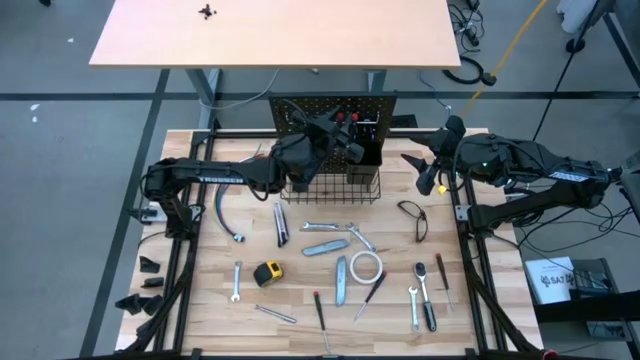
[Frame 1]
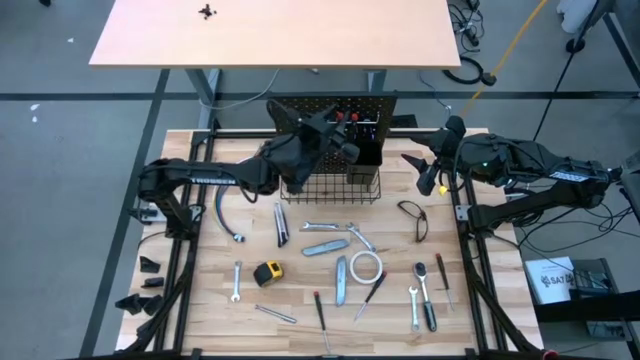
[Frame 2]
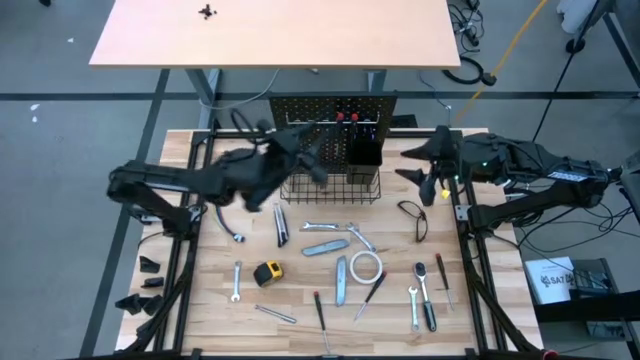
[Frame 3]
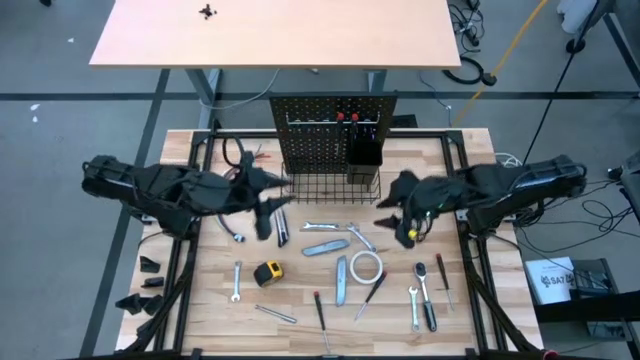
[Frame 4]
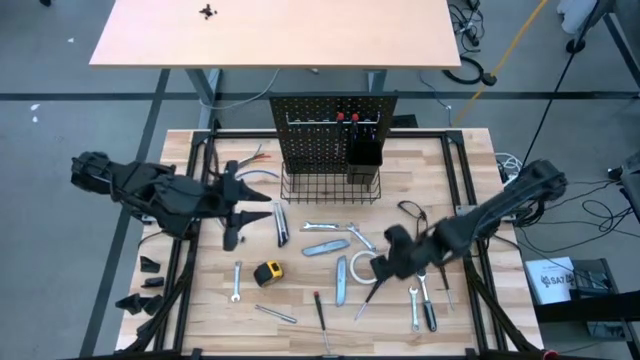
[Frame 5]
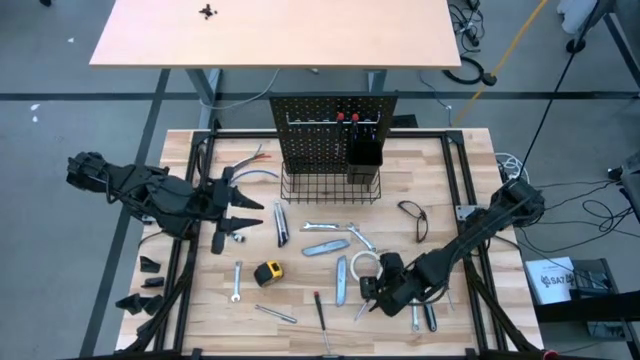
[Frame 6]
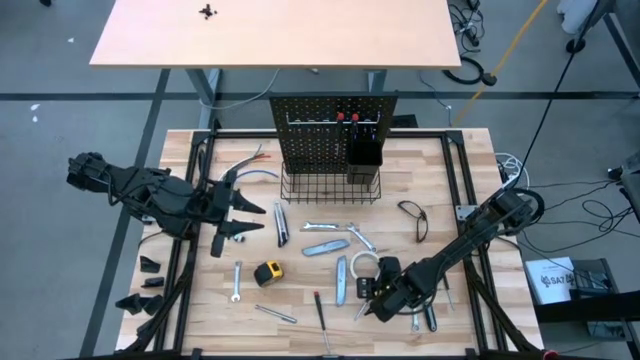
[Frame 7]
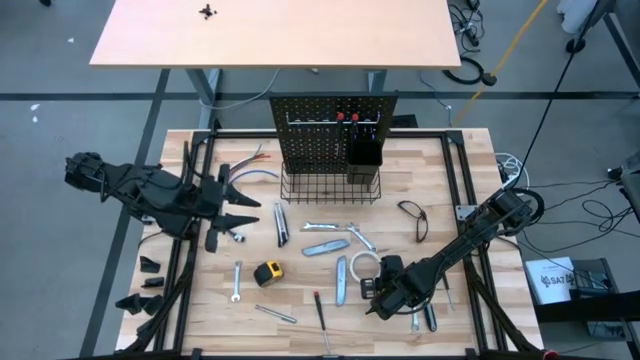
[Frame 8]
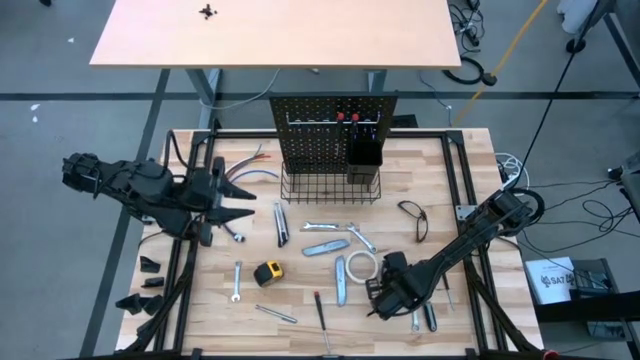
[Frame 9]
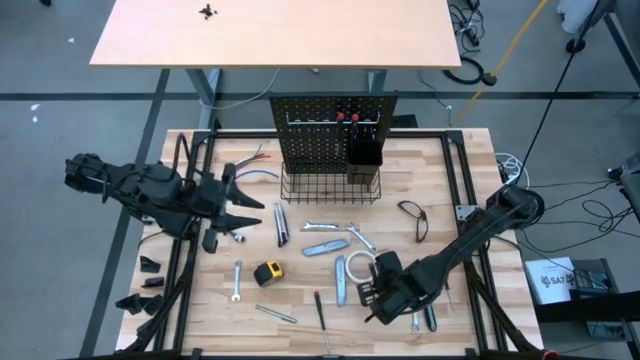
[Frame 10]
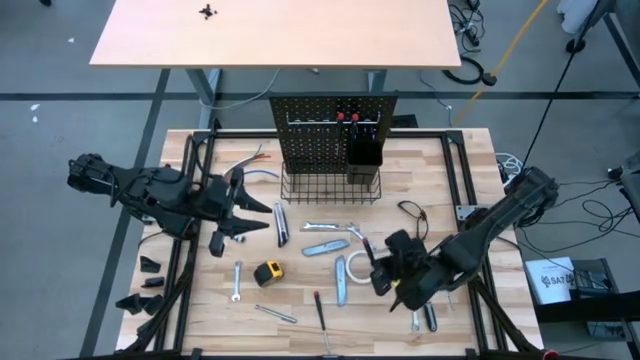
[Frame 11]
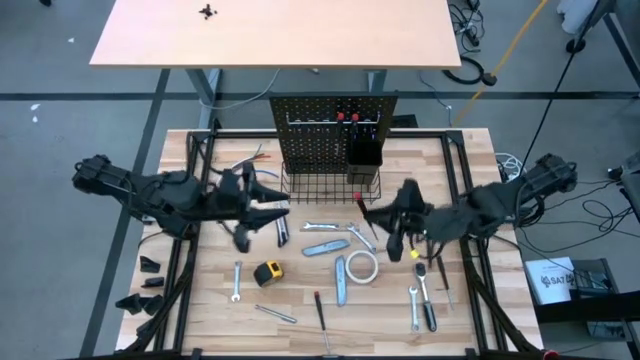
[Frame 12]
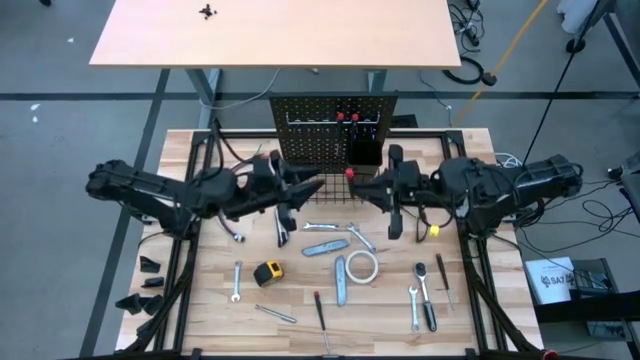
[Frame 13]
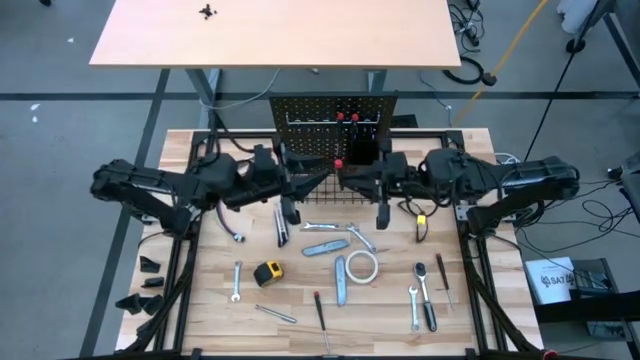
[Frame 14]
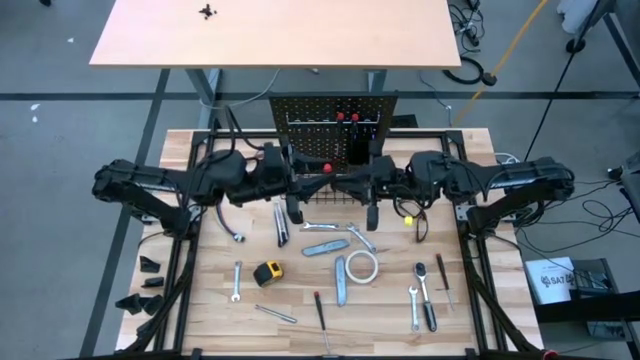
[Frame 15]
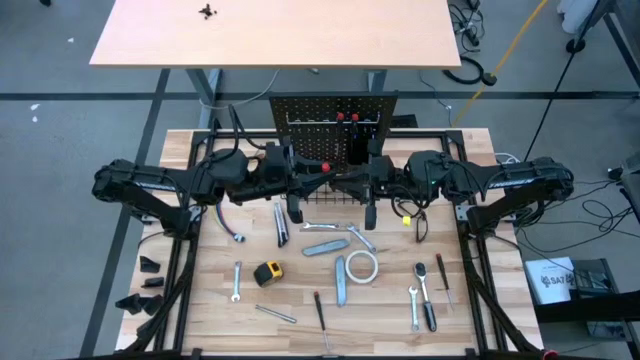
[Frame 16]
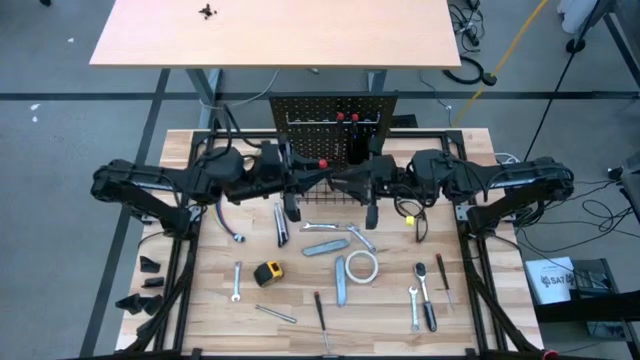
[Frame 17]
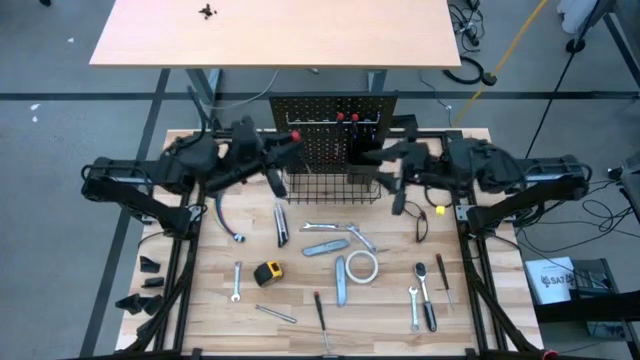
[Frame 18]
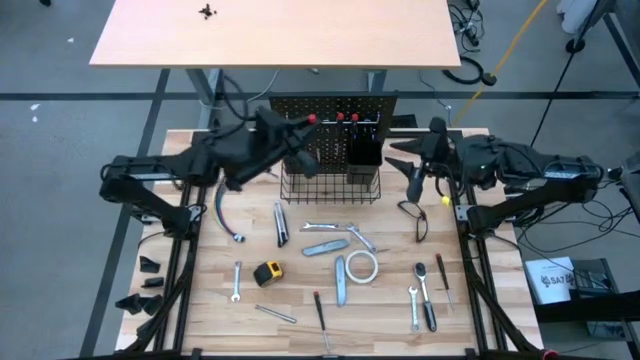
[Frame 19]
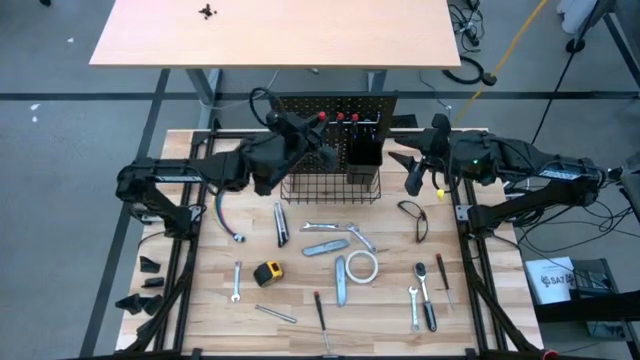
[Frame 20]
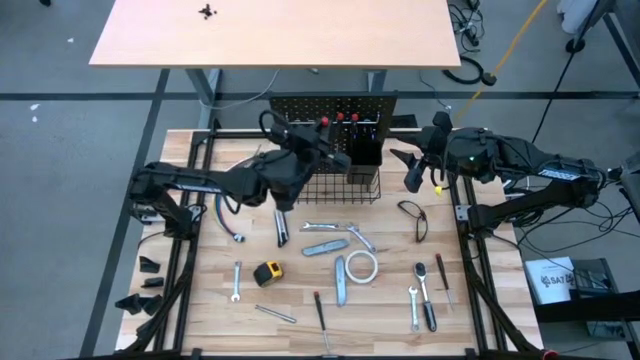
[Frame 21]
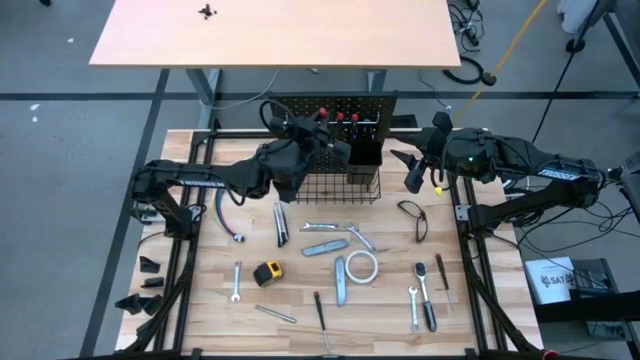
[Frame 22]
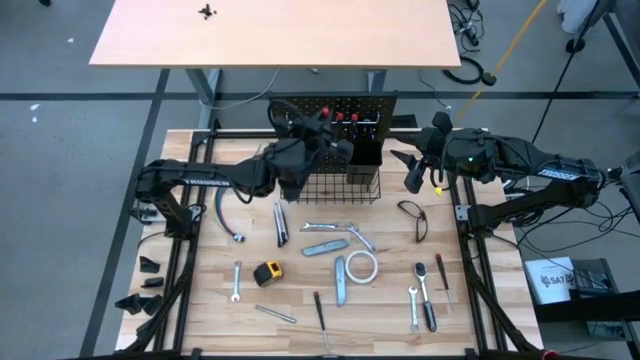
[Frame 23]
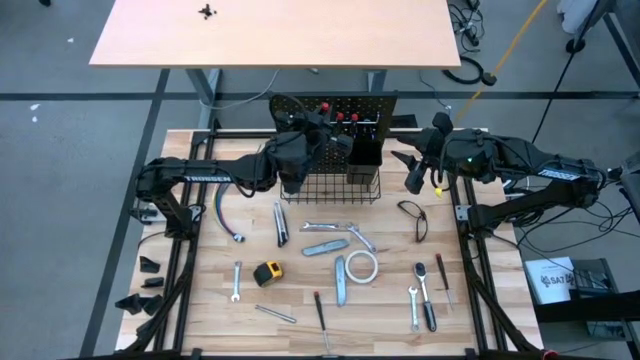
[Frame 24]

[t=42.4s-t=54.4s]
Task: Hang tools onto peg board
Hang the nut driver onto the pegboard

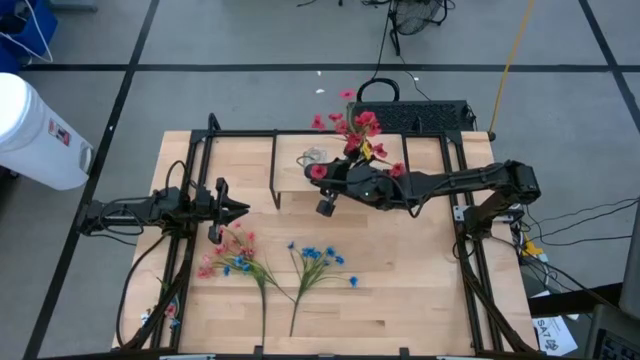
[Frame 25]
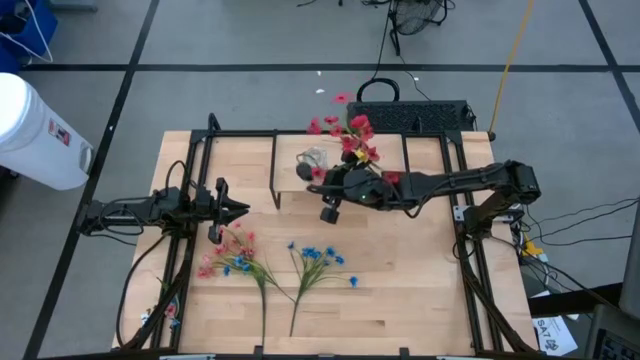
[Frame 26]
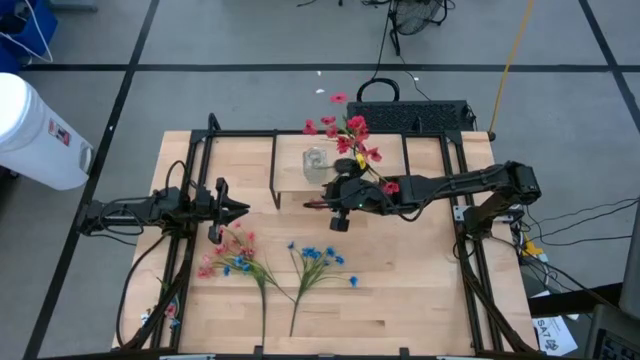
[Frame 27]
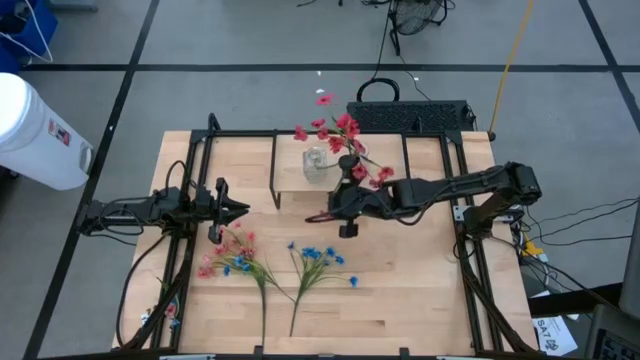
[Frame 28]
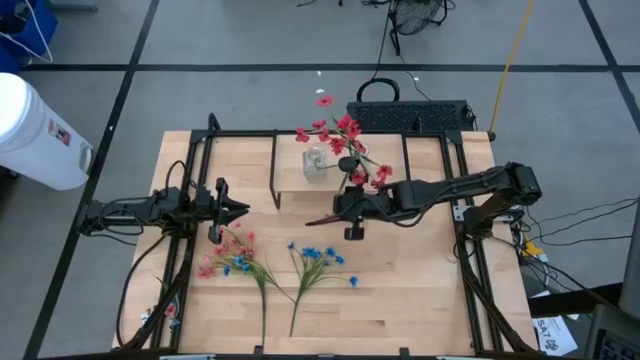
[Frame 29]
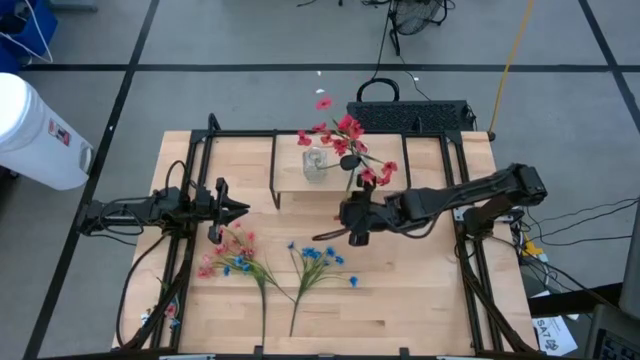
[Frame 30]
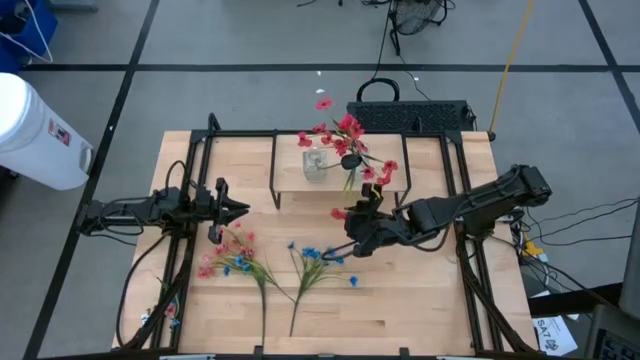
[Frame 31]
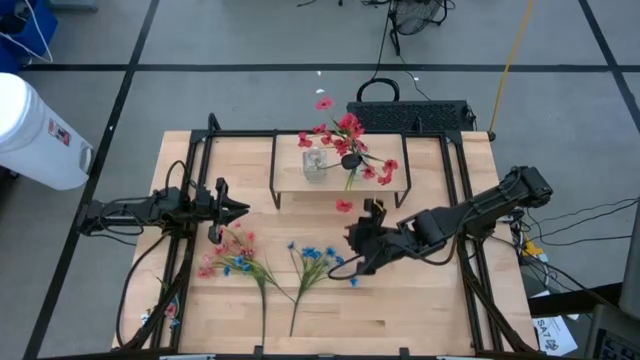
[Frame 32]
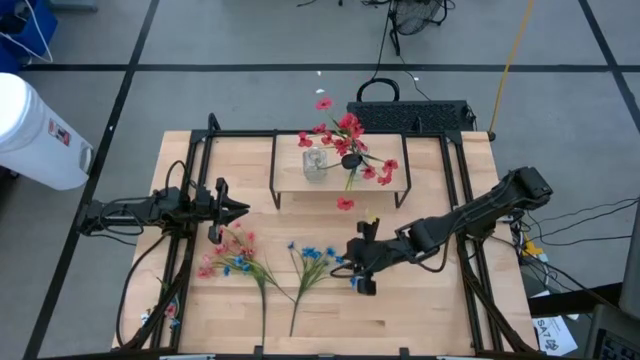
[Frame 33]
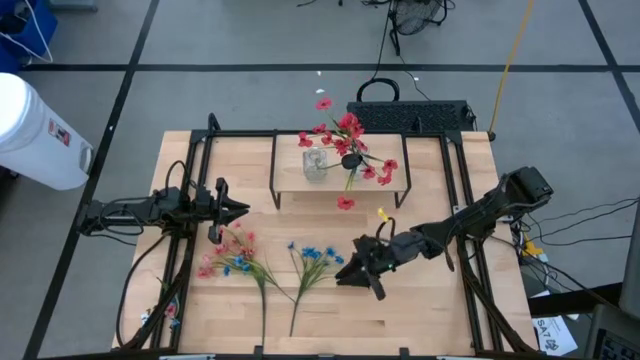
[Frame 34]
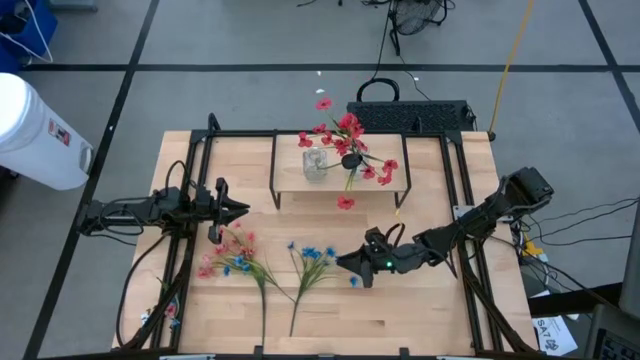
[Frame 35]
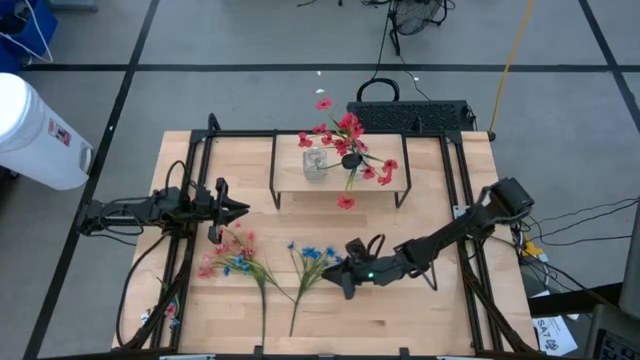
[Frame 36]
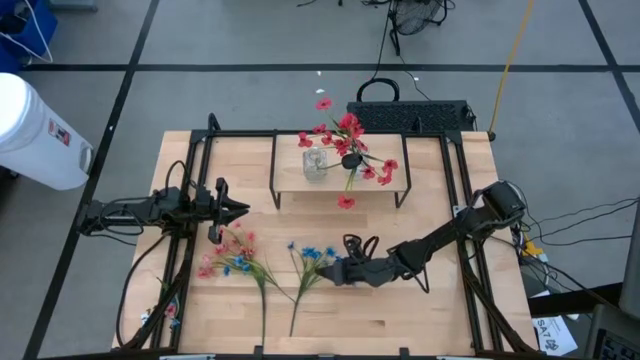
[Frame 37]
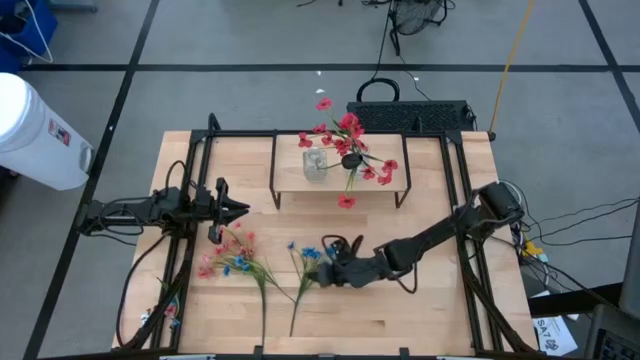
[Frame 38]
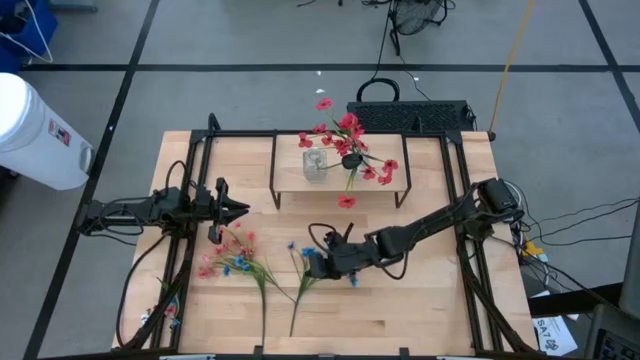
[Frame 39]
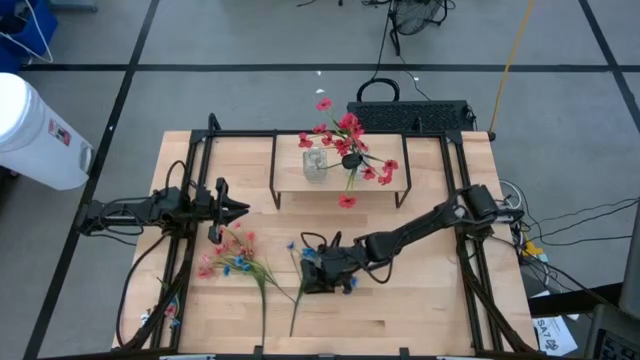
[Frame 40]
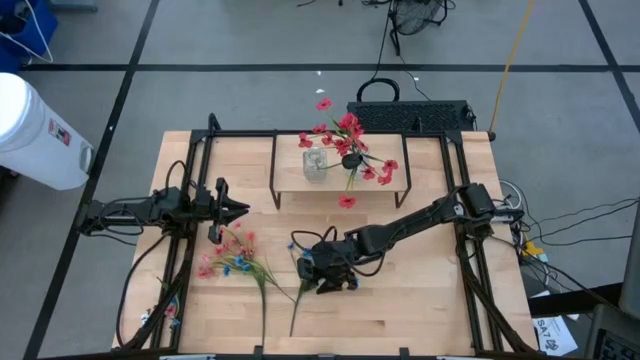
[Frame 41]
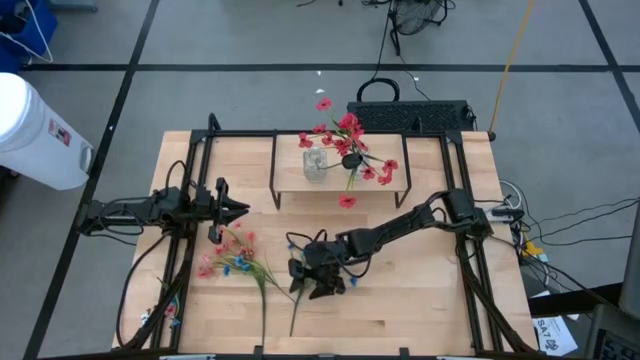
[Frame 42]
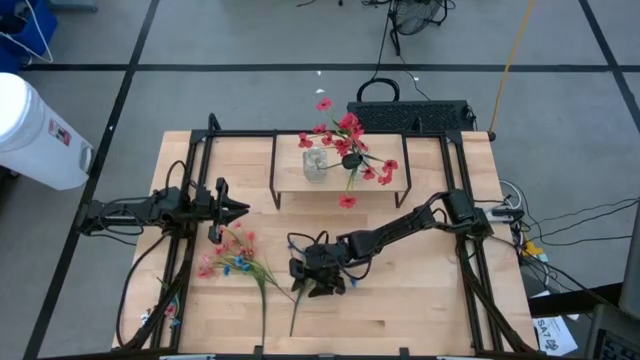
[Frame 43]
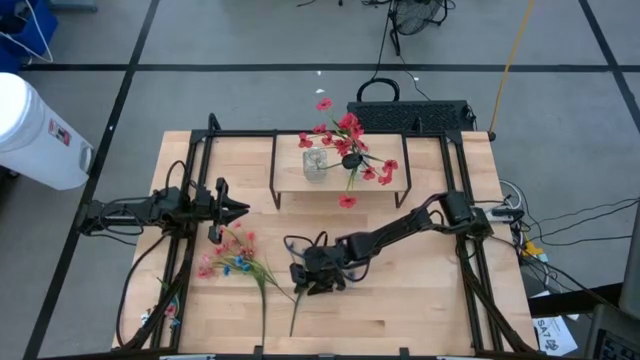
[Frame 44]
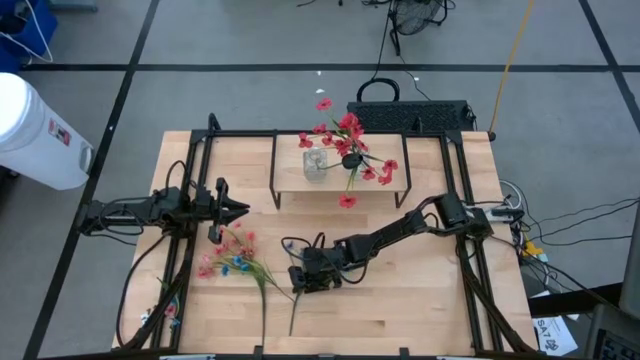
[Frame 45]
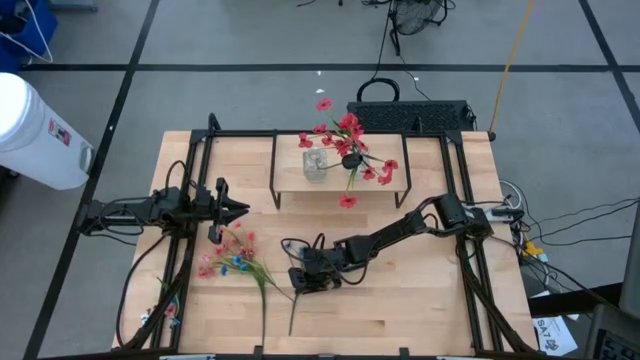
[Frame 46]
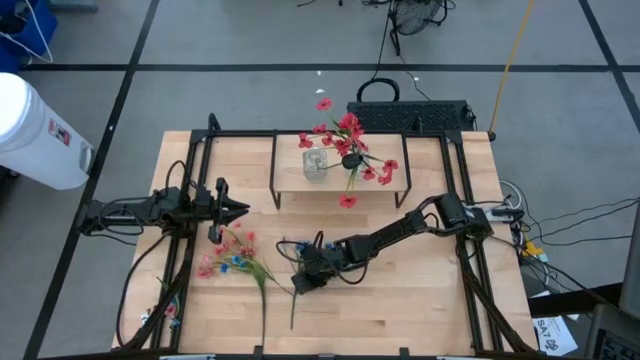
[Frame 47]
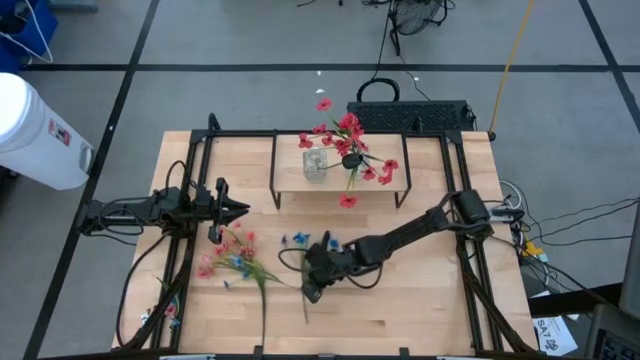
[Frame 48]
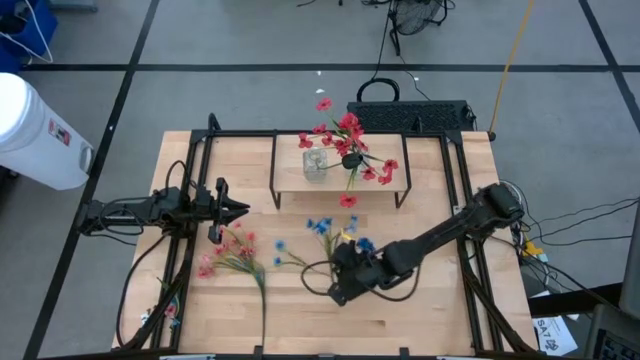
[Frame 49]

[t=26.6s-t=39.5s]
Task: Pick and place flowers into a vace then onto a shelf
Put the blue flowers into the right transparent vase on the shelf
